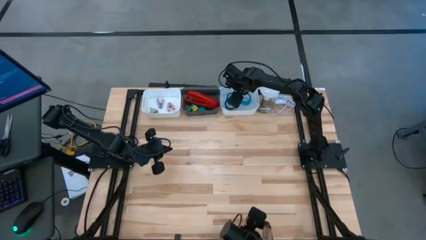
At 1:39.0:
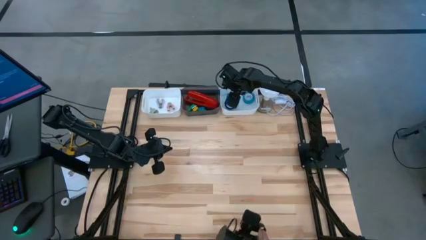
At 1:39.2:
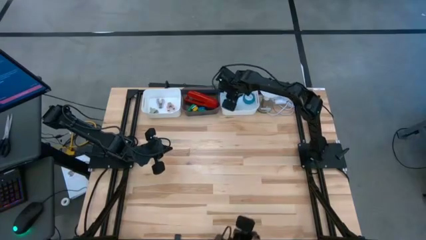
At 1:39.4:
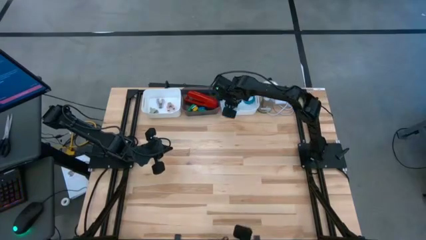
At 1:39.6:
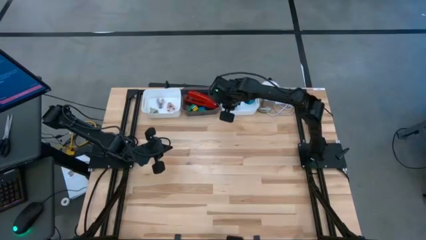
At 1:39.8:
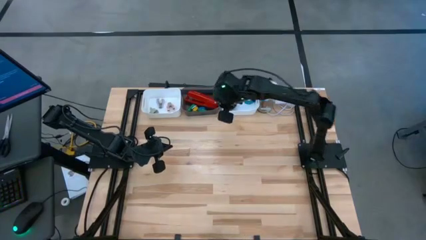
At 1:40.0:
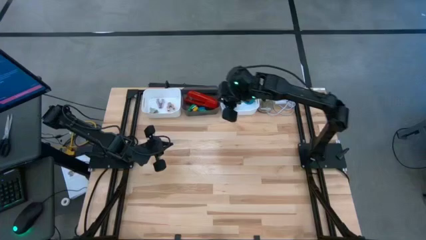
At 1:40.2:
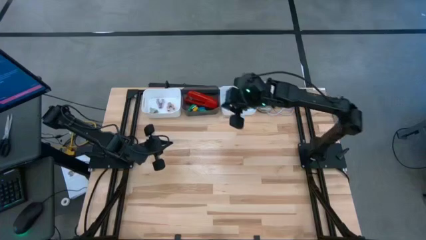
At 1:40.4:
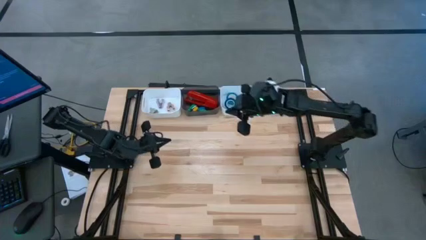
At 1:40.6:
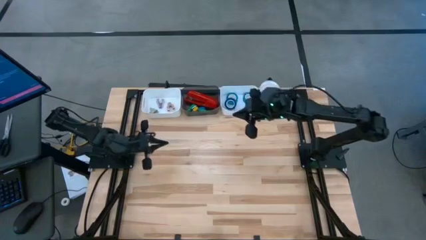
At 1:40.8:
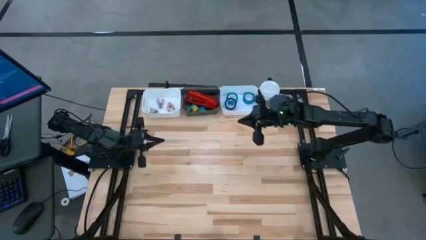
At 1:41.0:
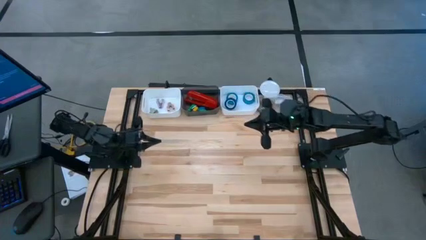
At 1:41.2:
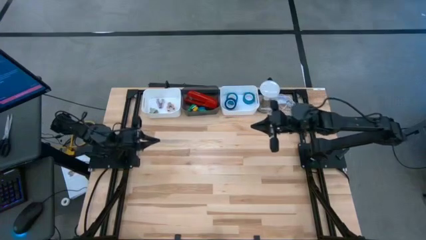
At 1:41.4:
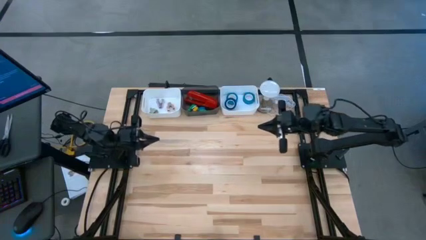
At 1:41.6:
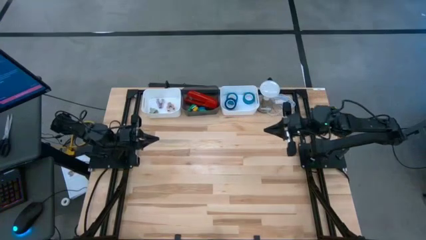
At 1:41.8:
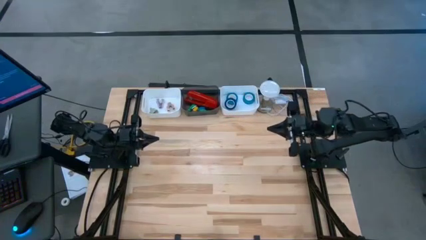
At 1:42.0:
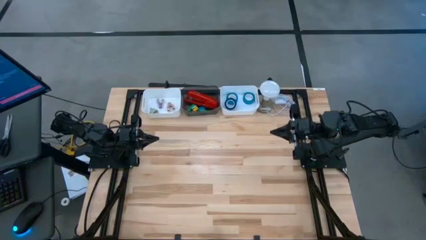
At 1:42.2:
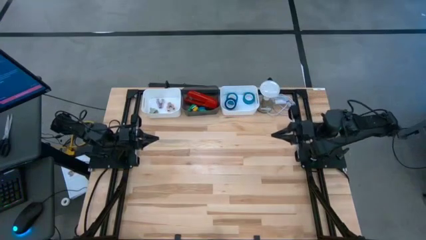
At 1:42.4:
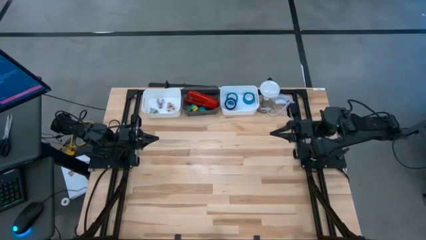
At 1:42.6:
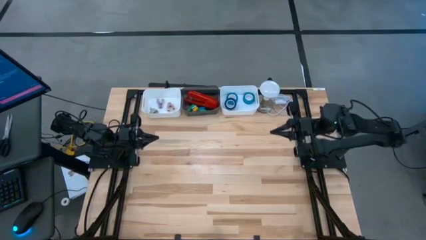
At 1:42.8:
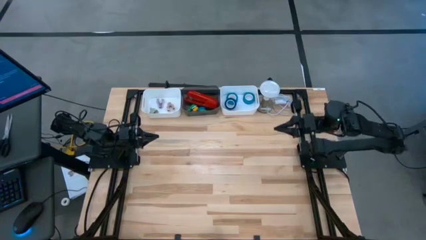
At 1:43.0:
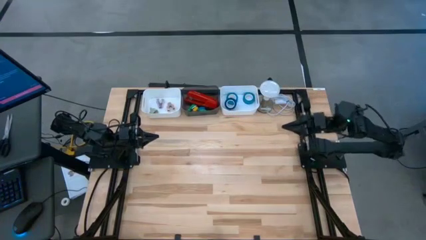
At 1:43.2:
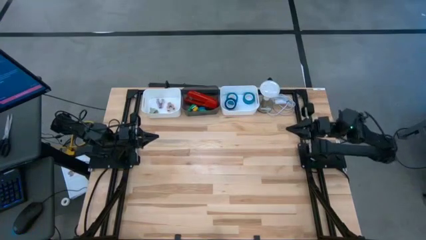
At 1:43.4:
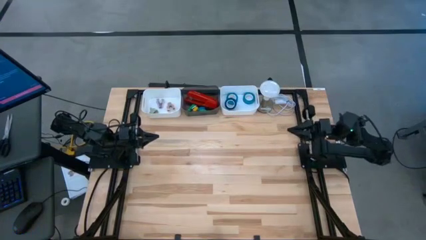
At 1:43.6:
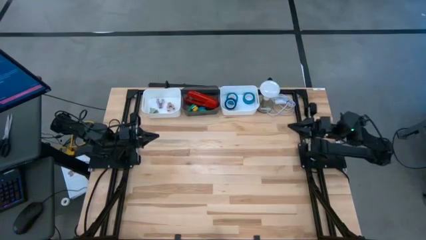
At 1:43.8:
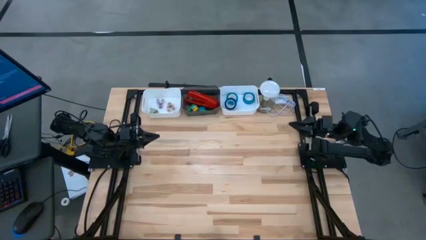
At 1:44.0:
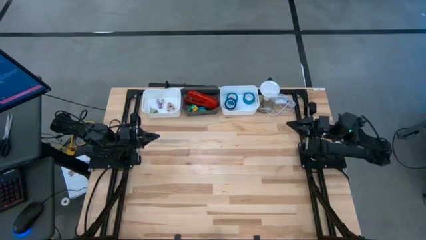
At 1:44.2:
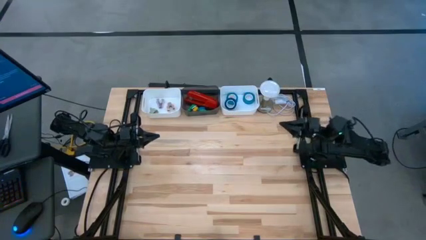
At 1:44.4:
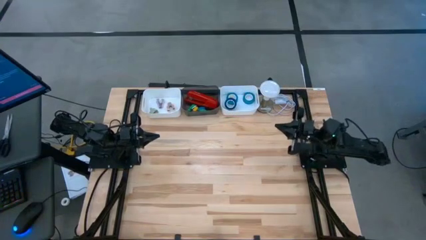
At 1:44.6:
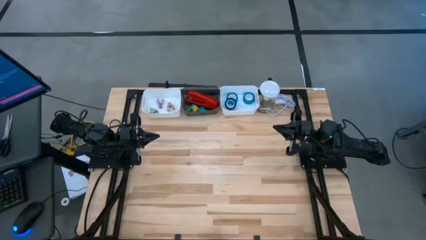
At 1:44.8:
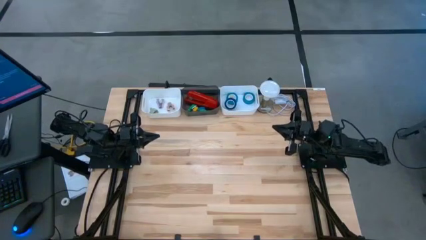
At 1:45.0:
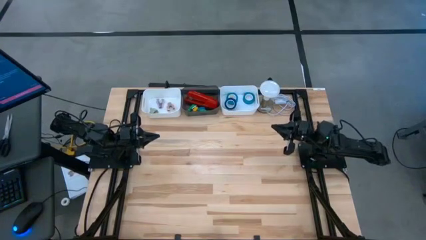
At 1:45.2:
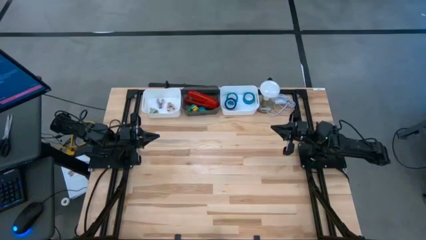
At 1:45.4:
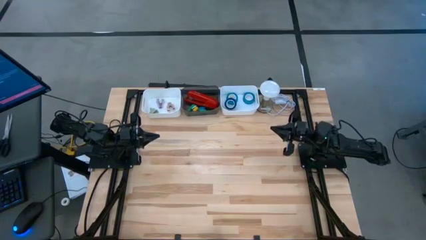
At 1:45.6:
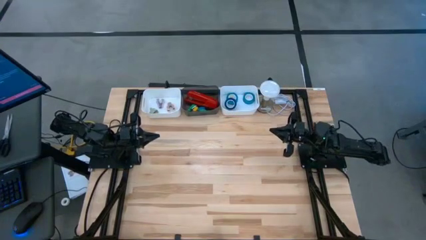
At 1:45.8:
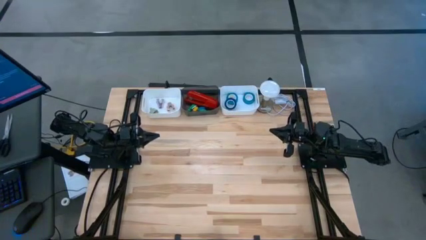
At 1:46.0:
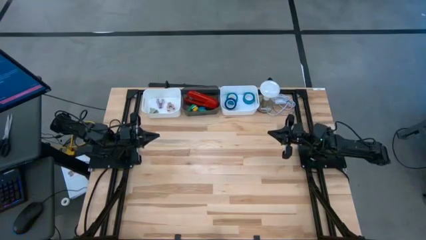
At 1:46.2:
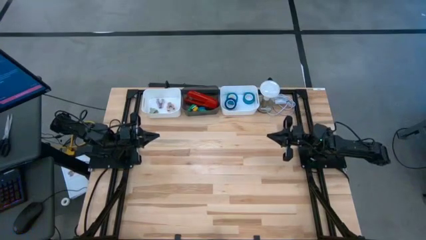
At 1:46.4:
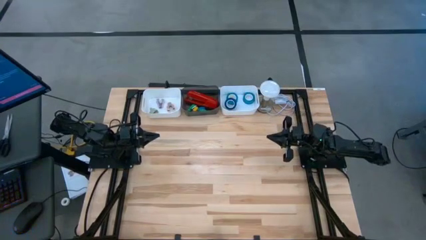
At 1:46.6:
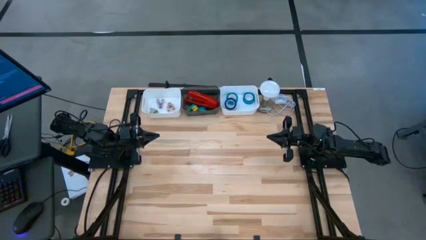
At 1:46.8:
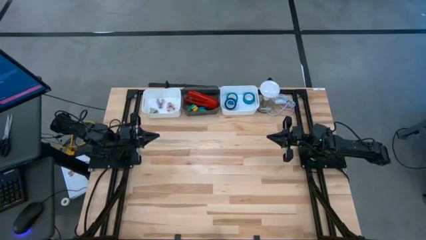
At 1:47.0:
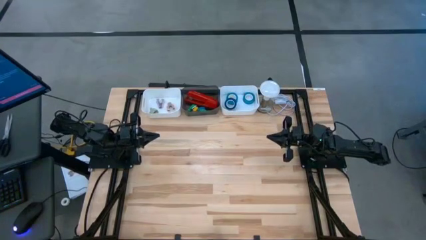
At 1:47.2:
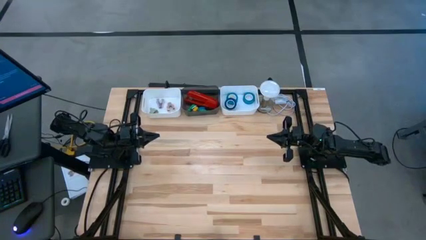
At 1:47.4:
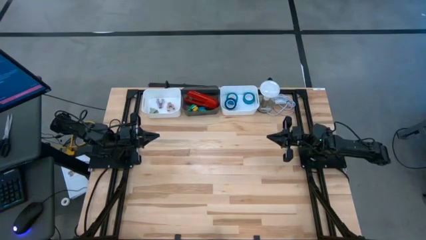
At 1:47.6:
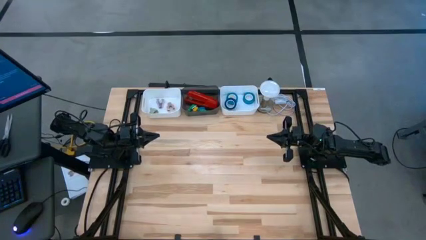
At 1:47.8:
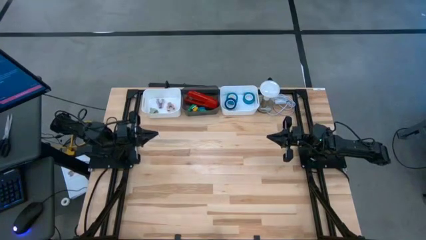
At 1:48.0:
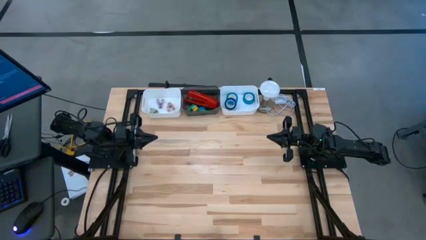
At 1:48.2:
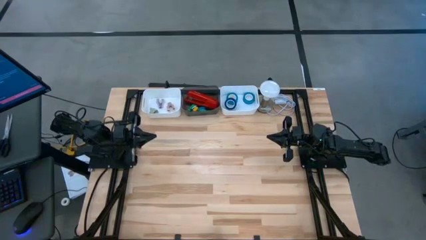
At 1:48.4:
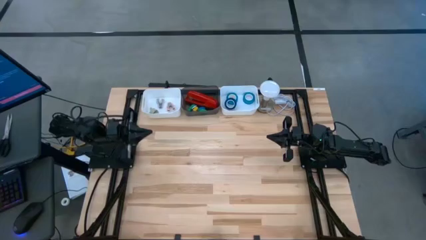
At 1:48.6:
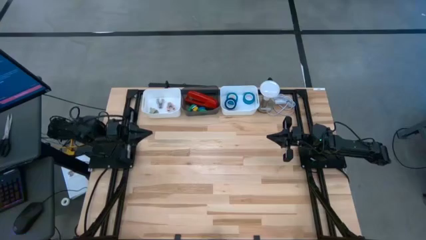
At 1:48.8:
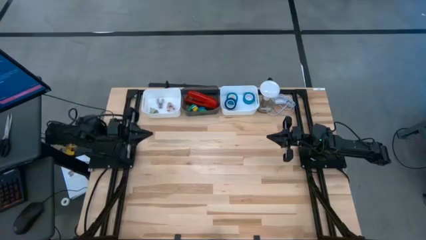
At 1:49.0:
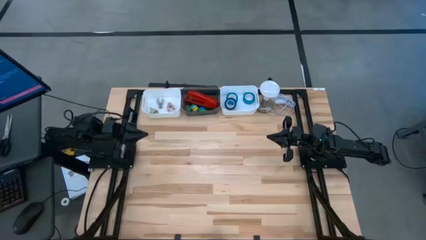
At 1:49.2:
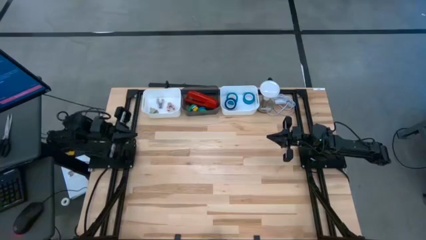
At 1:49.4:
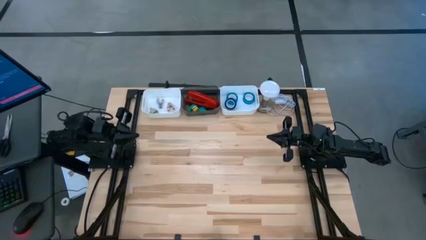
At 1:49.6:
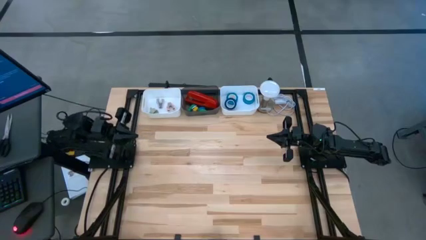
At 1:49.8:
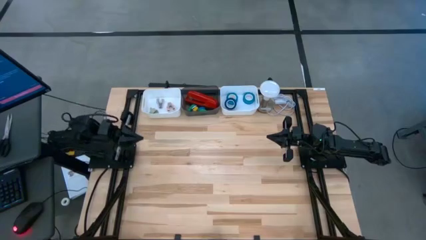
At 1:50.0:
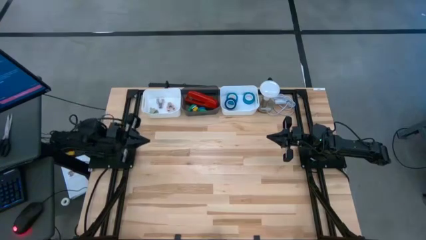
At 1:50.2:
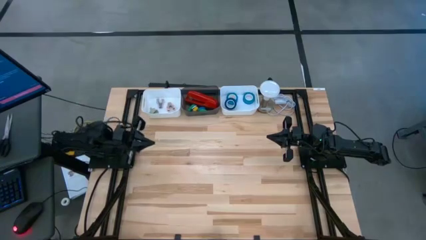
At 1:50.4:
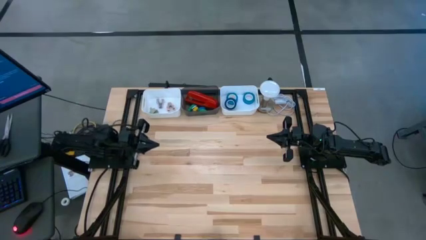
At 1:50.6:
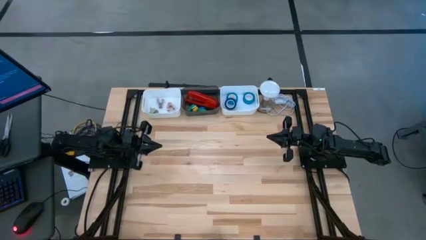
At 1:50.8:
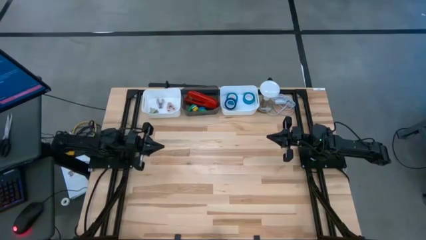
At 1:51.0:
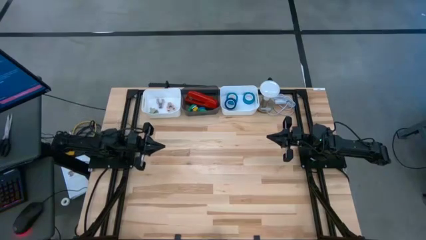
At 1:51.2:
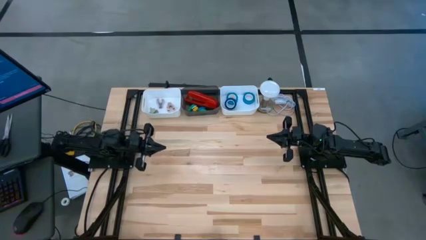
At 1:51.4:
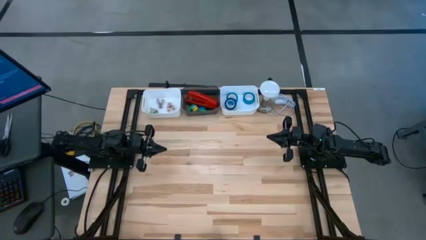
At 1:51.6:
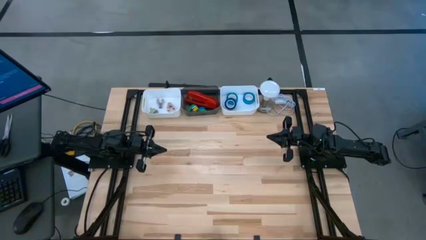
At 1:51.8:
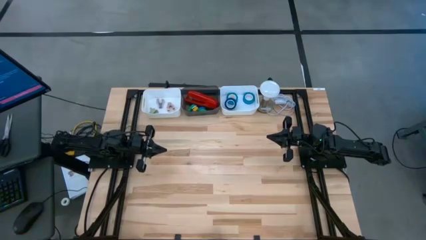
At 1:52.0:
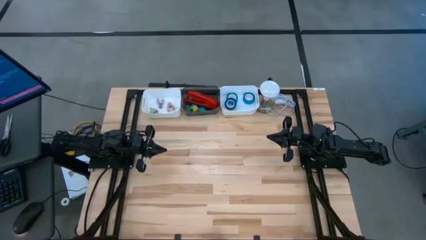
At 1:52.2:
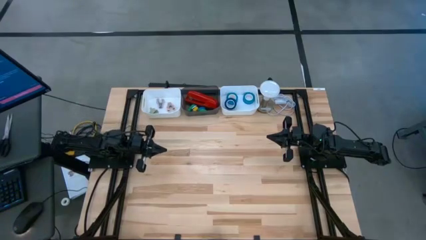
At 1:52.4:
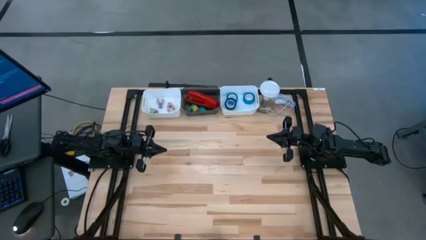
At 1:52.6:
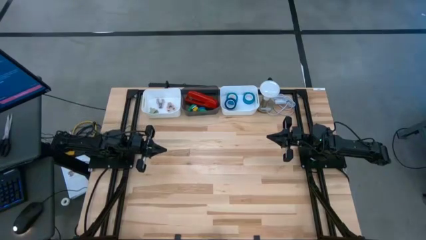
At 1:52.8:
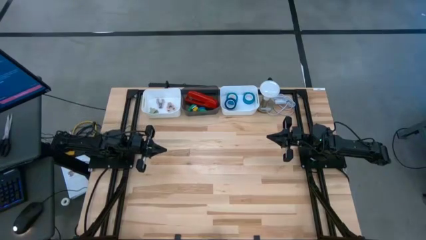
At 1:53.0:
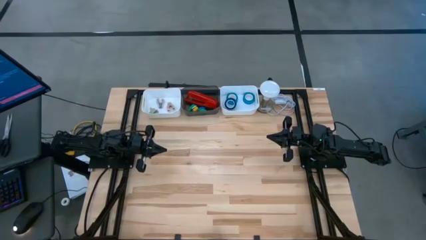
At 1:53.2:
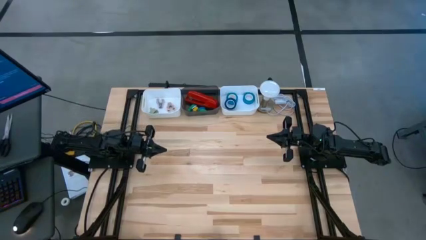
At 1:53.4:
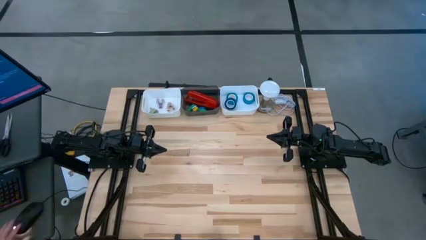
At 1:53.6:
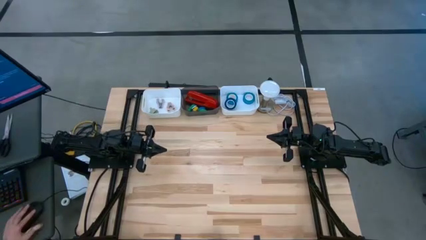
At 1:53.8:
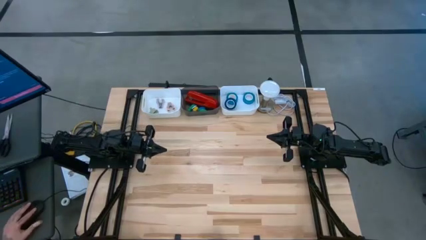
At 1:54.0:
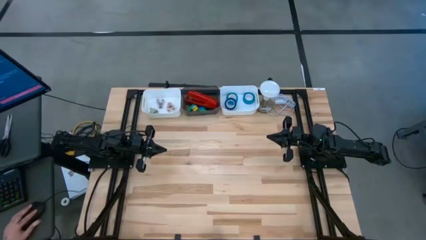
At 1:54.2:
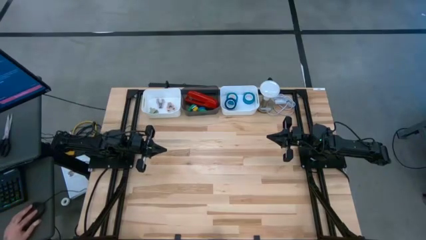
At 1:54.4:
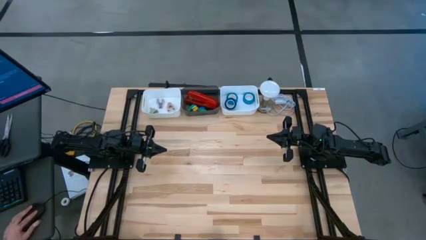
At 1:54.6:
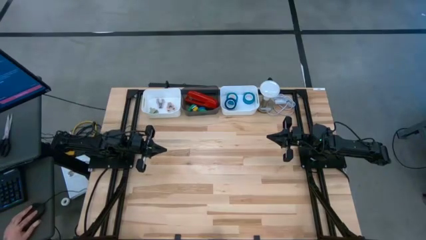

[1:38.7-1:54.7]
Task: Pick and place Stapler, Stapler remover, tape
Return to Home Position
